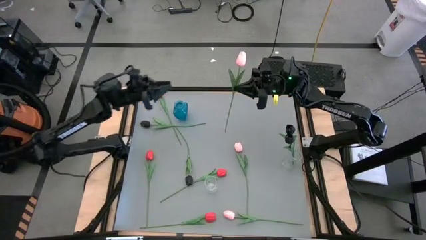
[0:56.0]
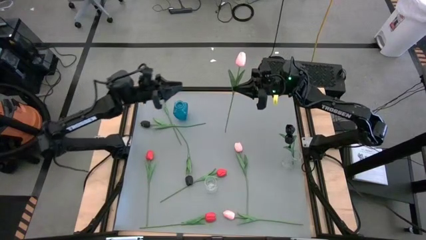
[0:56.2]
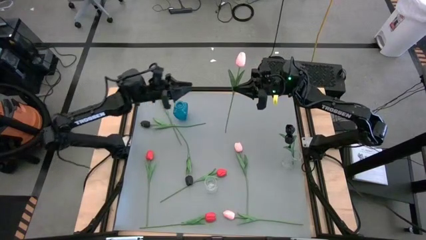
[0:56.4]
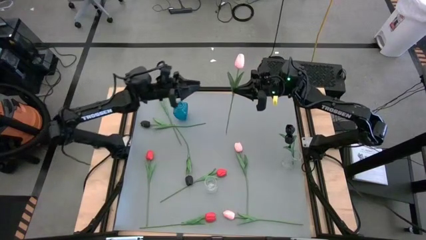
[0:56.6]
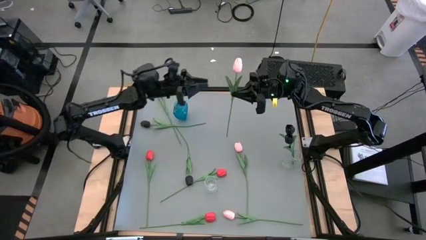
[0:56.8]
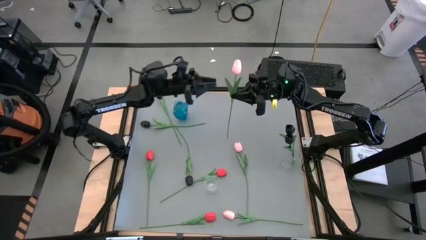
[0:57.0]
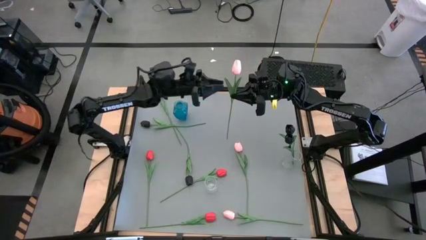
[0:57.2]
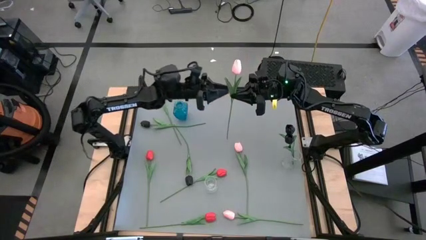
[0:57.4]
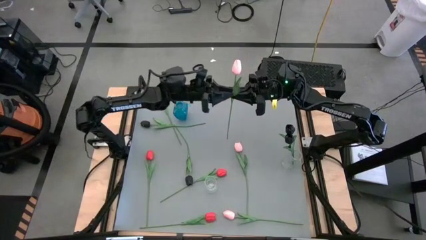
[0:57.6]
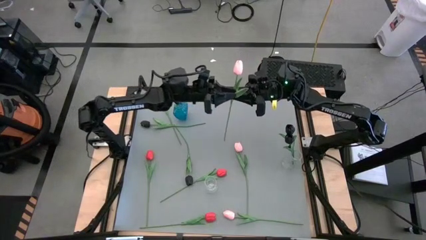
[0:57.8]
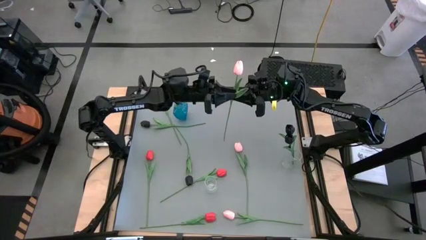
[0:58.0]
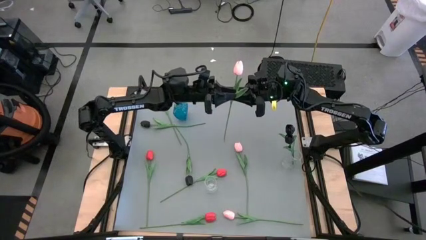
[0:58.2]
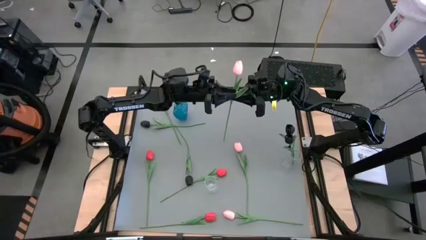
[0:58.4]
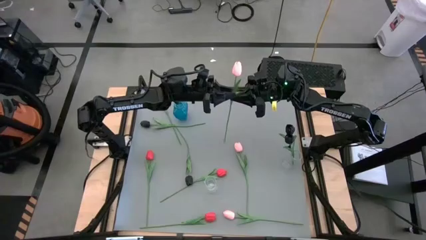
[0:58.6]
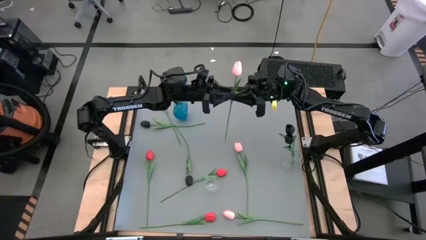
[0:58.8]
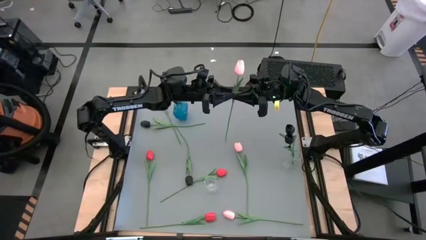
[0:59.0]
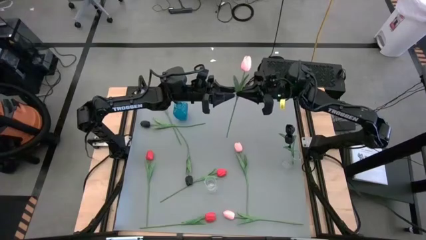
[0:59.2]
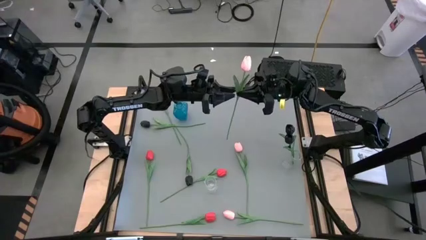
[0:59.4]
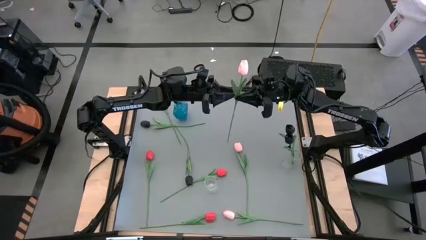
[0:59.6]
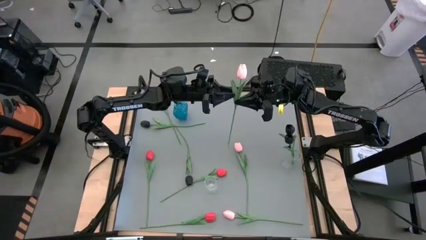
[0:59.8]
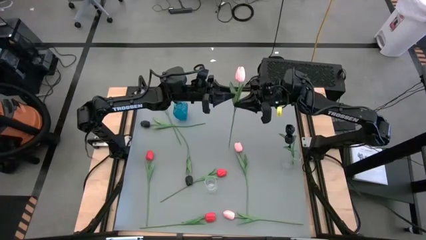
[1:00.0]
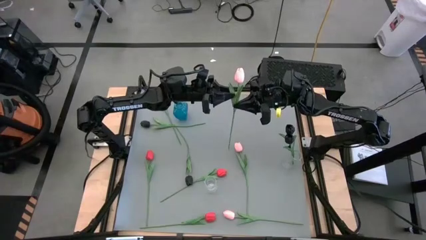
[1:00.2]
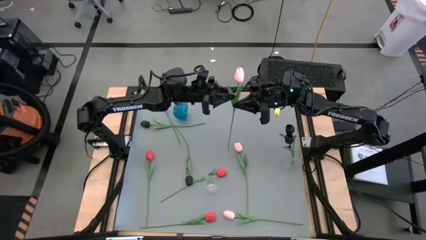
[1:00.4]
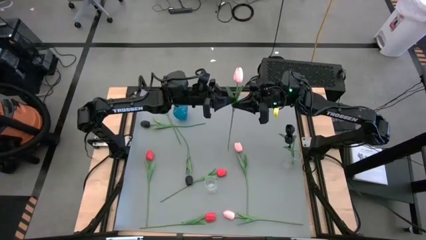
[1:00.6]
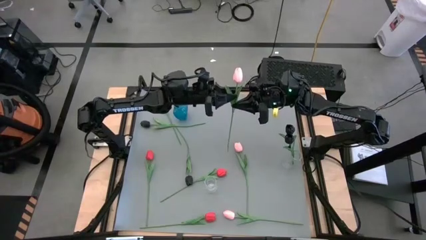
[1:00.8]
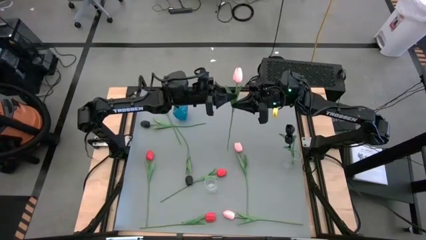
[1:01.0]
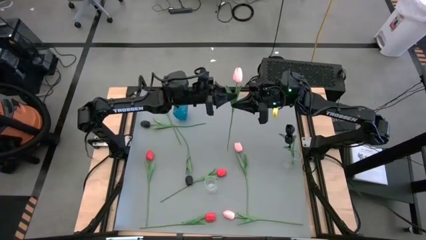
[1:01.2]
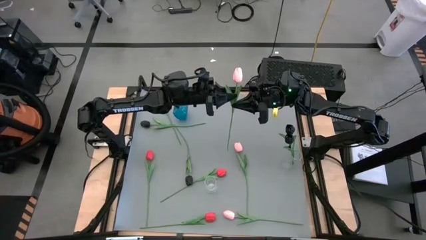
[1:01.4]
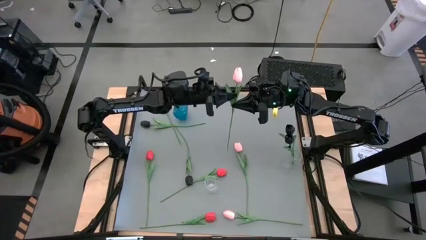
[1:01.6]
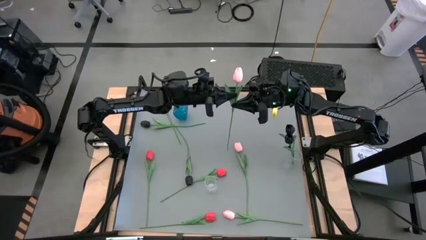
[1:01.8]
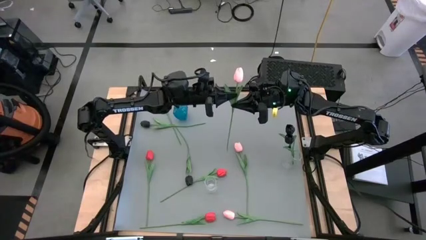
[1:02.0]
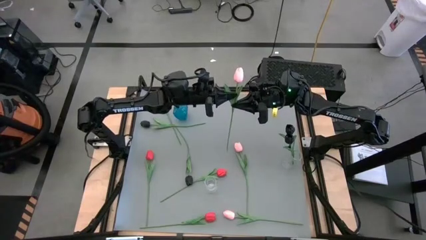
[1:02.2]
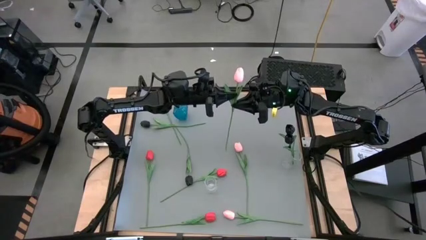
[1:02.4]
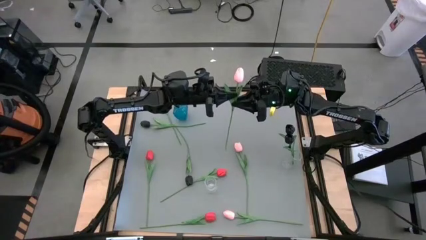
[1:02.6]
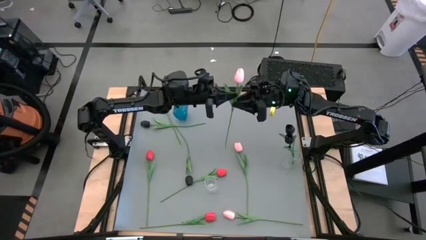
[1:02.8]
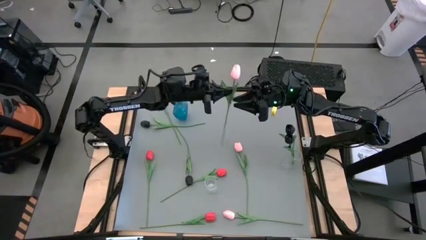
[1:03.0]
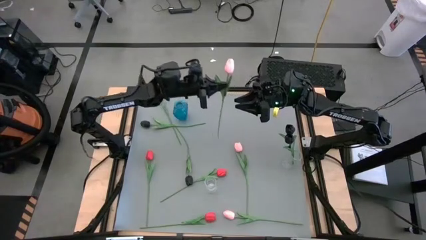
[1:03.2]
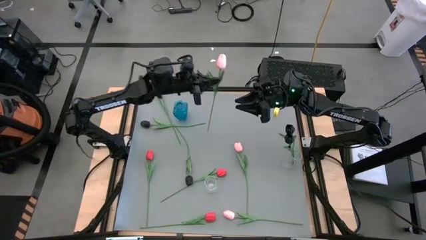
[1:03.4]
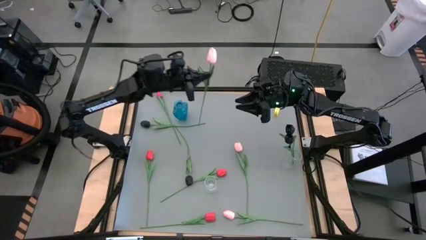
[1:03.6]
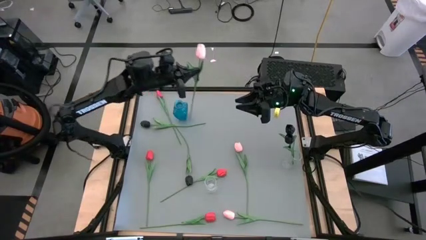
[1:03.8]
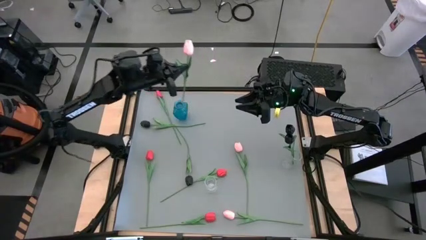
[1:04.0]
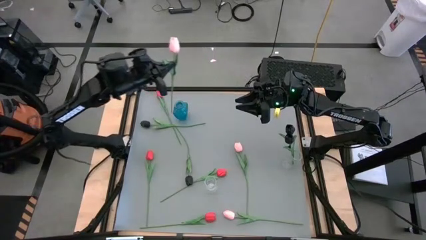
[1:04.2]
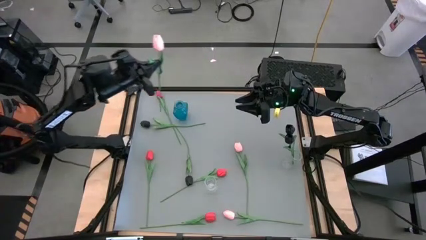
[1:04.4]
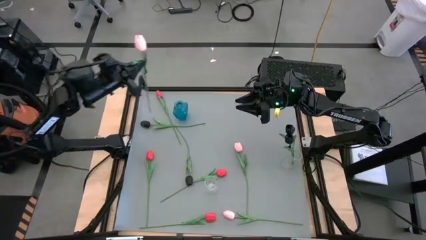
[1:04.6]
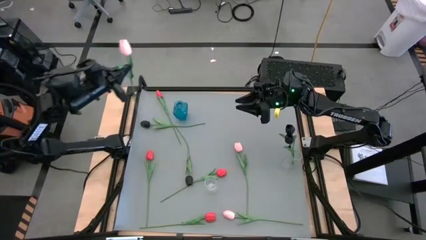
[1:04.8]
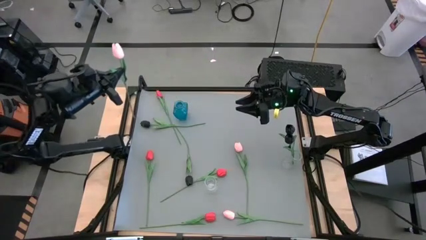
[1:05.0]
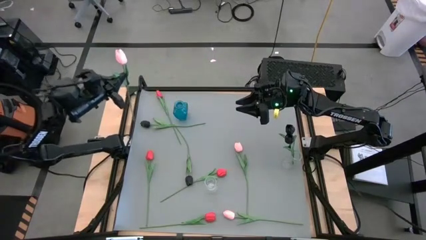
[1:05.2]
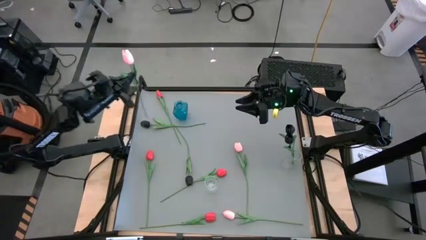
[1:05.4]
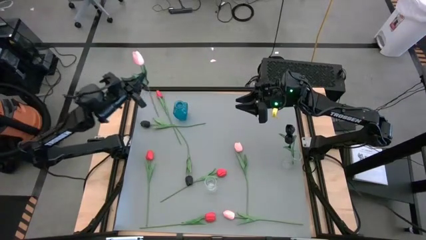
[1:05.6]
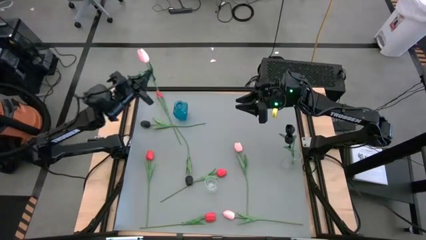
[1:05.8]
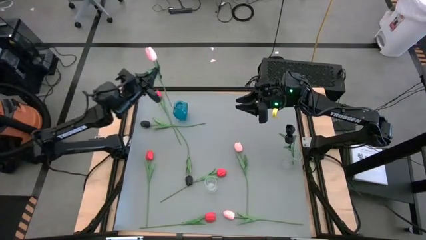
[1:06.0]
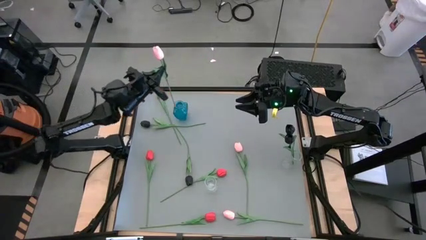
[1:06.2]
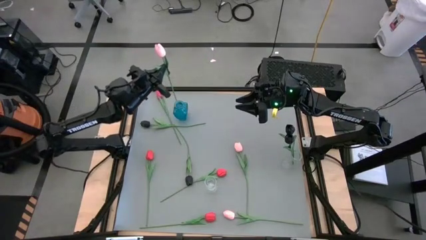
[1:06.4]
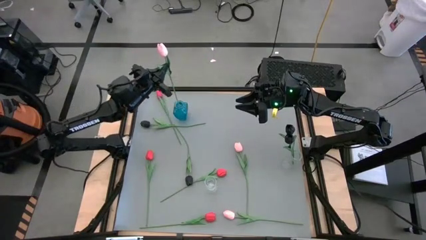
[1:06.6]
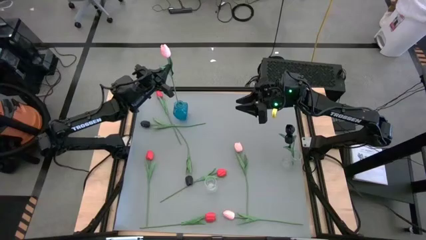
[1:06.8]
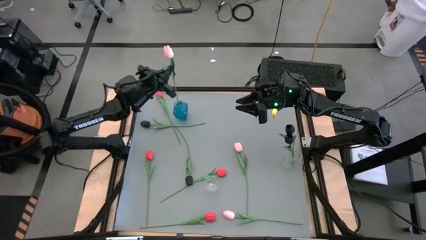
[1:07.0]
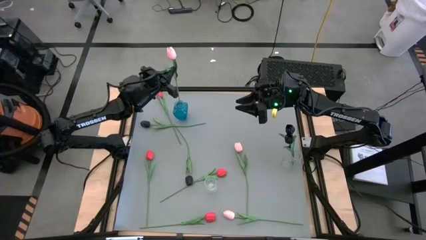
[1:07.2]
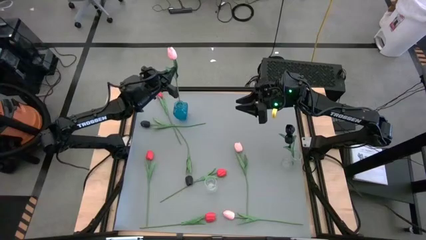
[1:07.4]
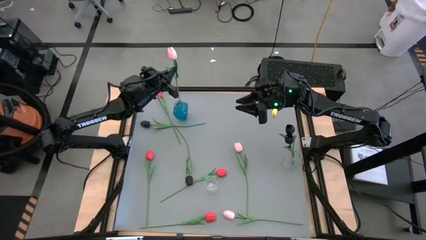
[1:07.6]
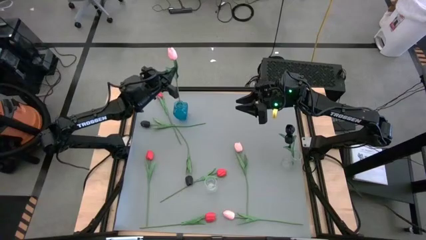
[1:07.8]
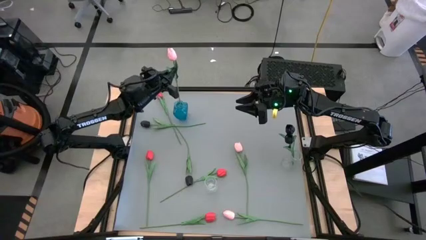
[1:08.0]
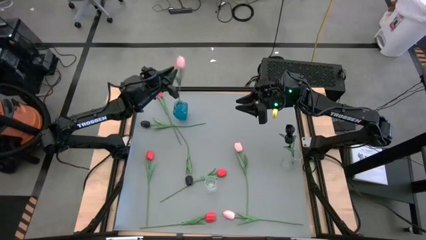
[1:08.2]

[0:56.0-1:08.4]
Task: Sort flowers into vase by color
Put pink flower into the blue vase
